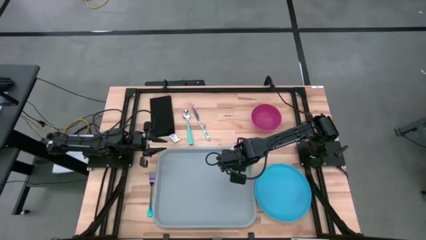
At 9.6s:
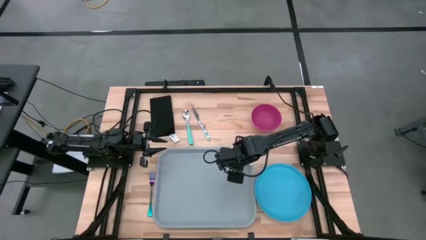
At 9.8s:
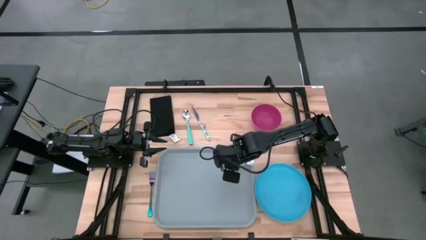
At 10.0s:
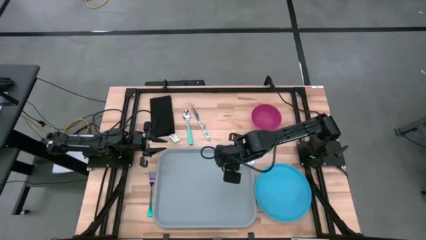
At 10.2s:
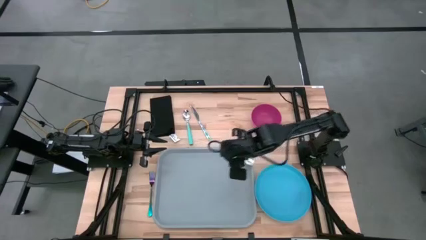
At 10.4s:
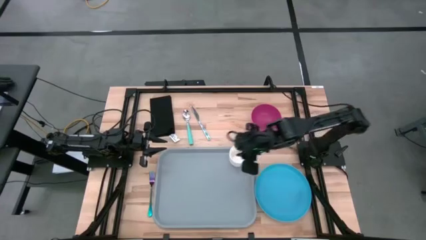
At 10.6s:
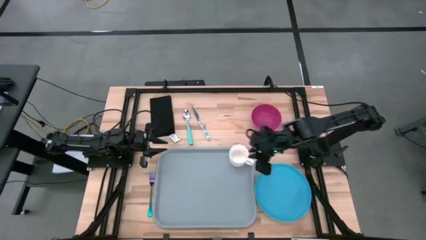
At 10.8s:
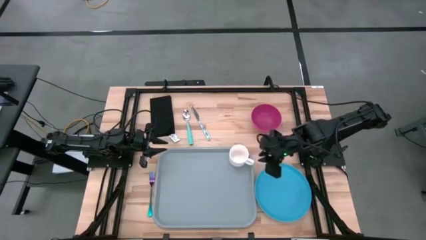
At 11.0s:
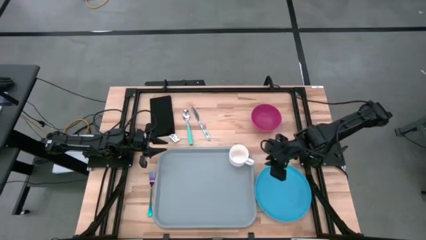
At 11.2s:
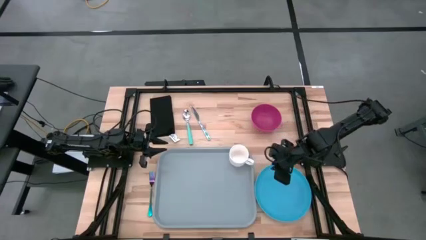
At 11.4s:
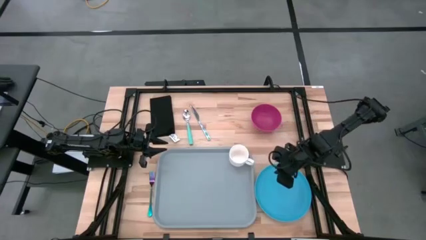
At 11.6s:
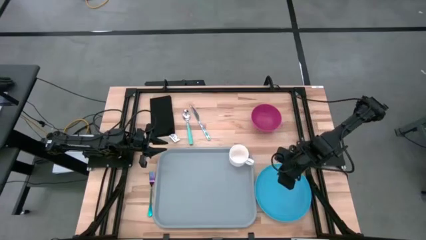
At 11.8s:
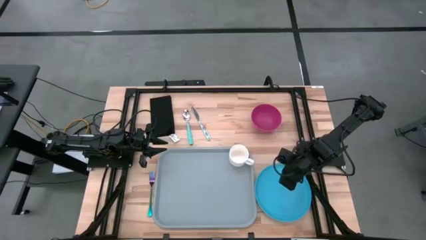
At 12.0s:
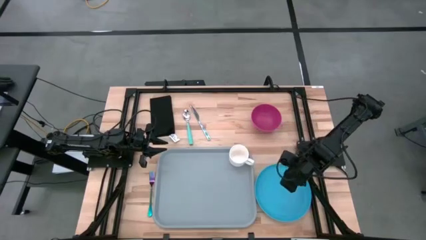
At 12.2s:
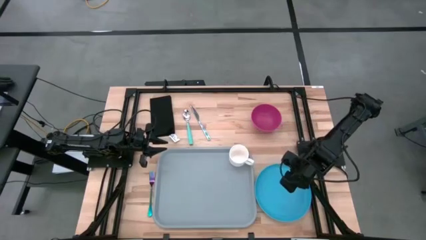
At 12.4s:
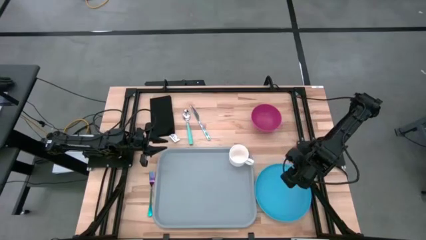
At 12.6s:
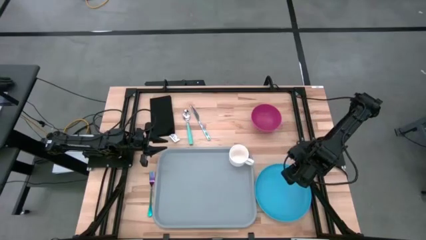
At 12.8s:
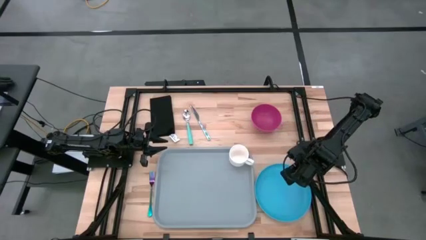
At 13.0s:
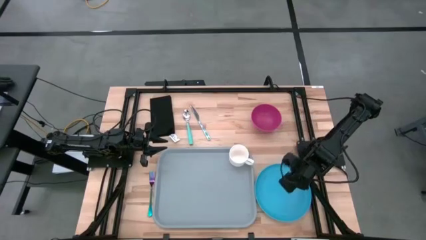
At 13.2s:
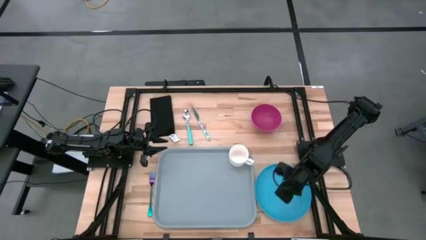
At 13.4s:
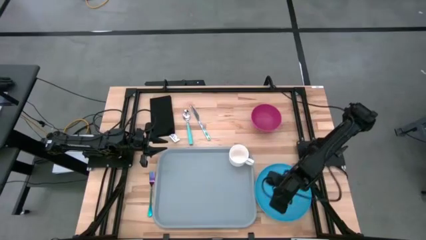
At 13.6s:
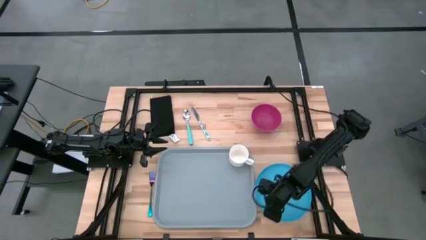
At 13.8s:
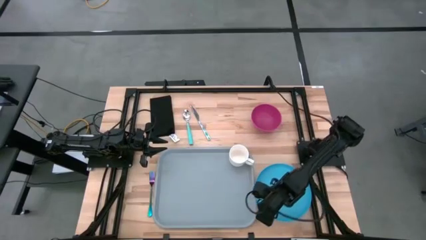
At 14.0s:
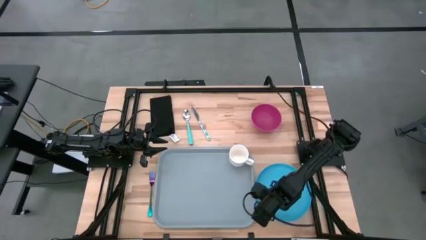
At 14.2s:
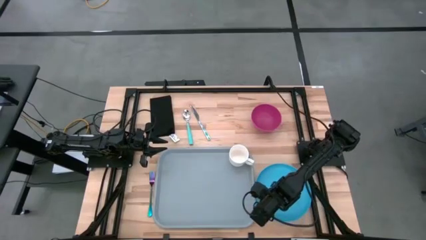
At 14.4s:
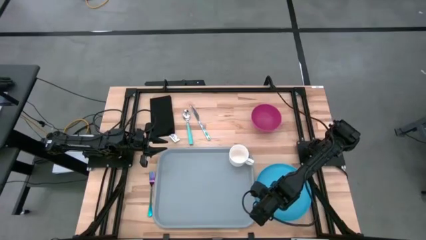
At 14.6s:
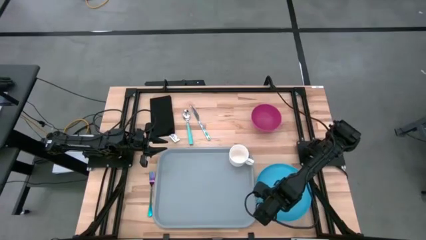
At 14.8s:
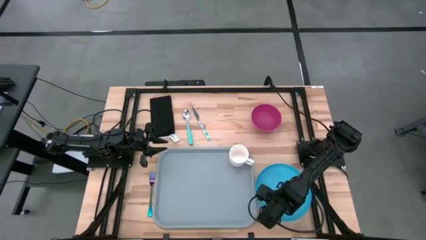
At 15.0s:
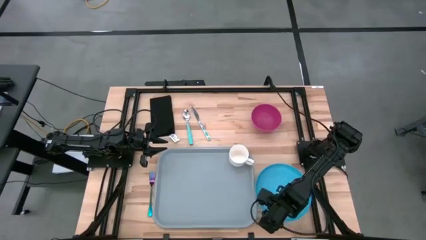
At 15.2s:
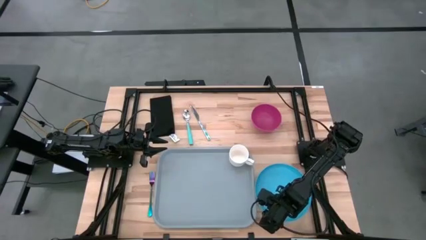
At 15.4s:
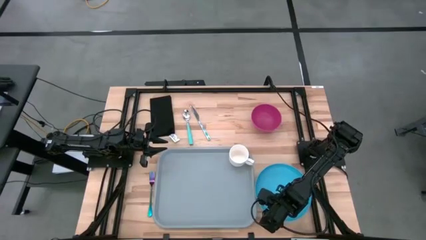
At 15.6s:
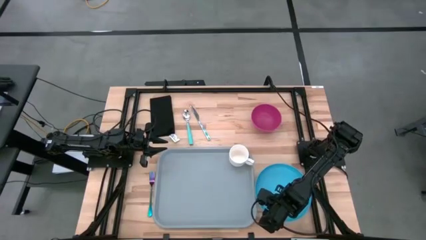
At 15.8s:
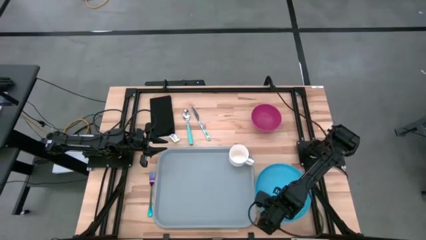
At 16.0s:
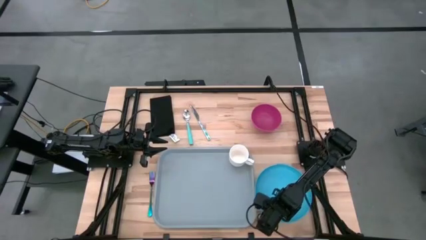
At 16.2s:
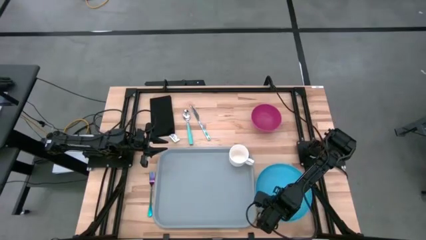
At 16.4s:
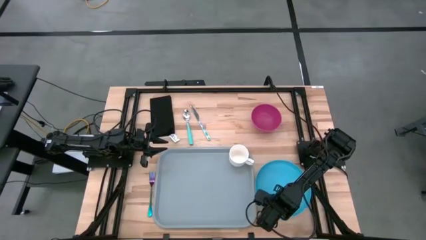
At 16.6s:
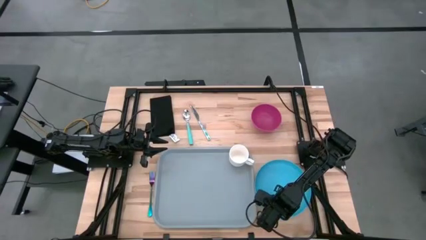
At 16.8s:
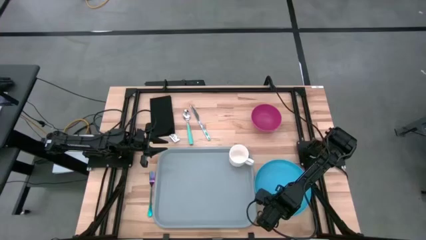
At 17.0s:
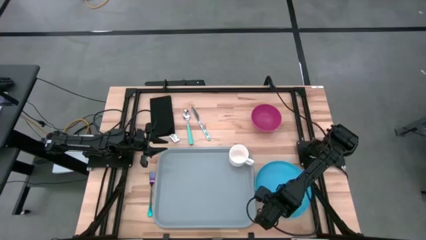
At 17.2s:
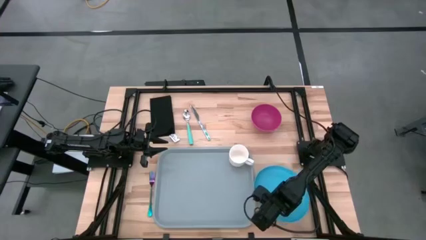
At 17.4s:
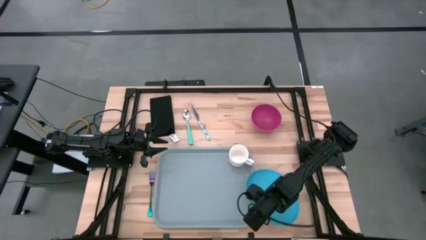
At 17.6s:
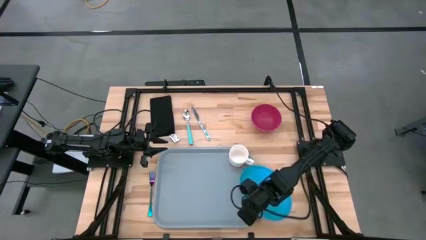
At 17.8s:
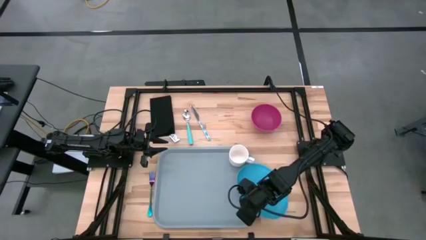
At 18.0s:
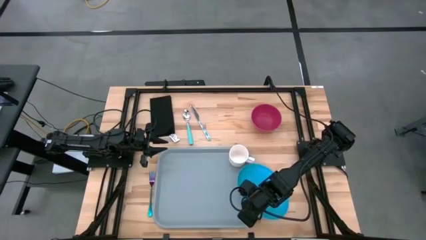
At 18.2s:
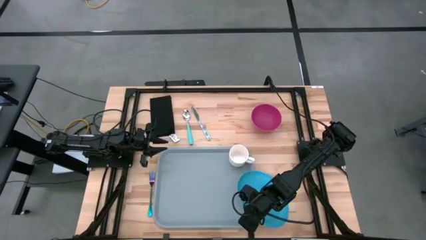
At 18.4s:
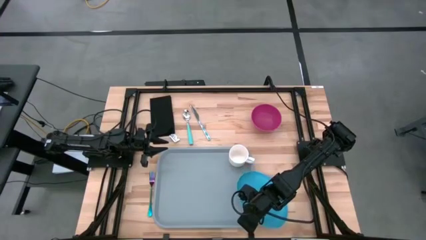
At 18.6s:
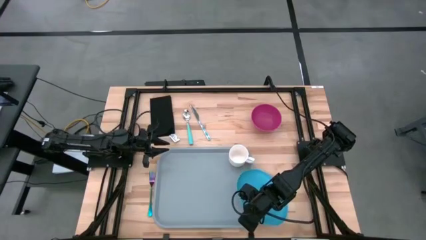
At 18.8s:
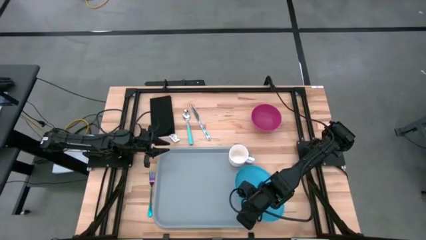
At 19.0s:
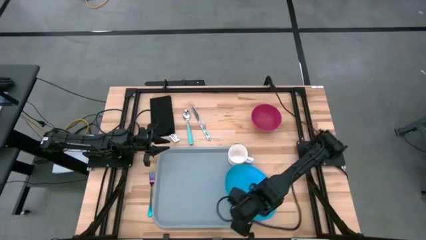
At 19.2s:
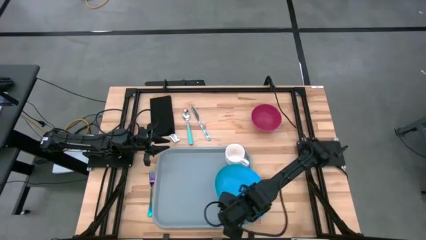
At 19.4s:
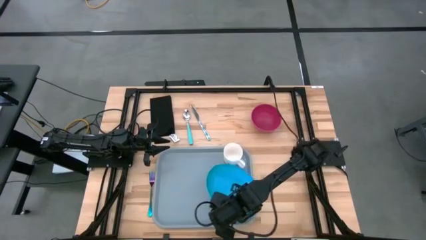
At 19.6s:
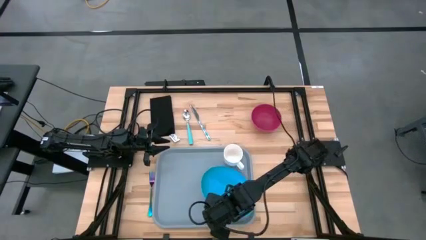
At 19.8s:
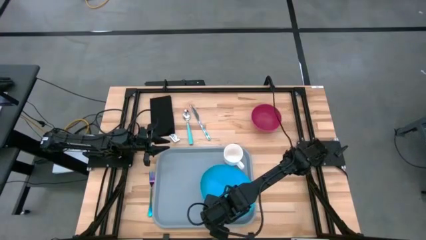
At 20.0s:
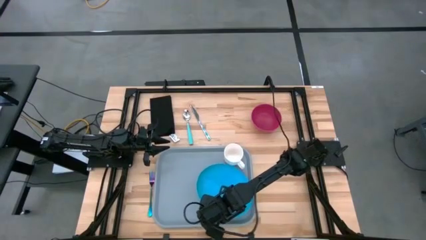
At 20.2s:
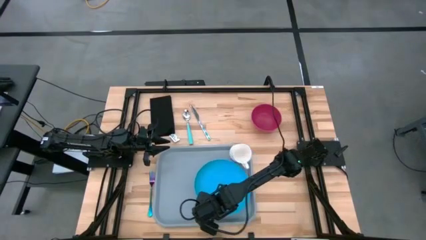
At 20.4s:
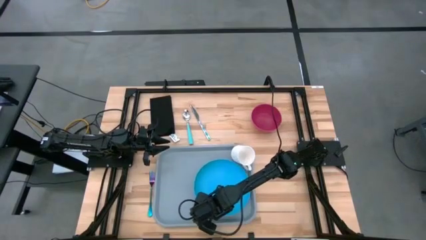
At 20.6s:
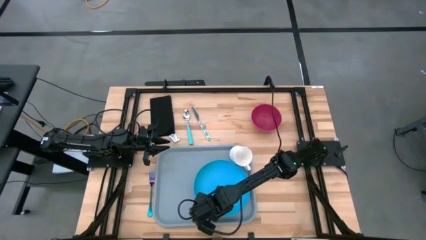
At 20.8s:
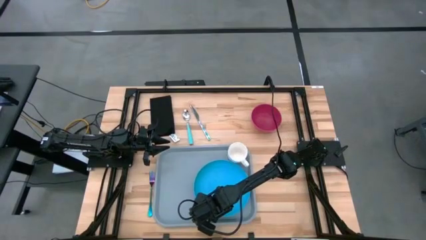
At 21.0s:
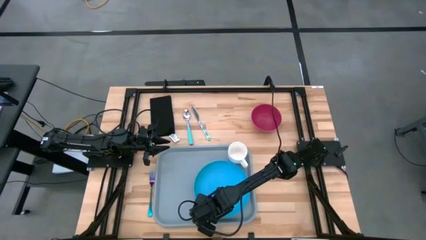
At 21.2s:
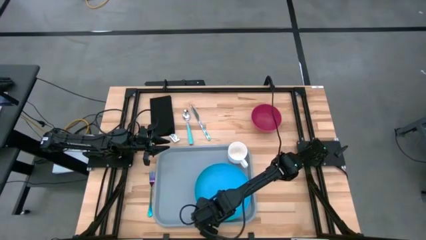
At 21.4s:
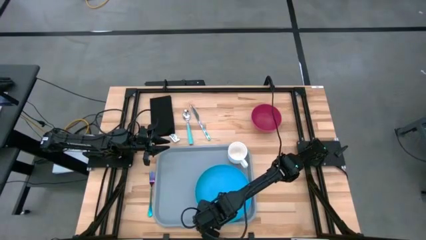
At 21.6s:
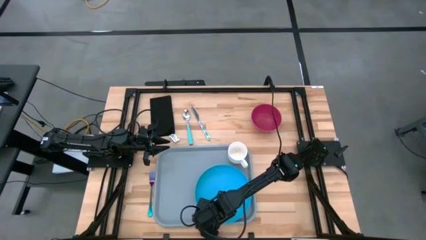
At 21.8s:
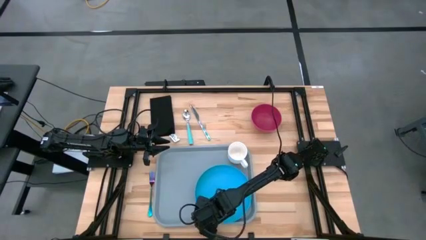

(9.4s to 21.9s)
Task: Set up tray
Put the blue plate on the gray tray below the white mug

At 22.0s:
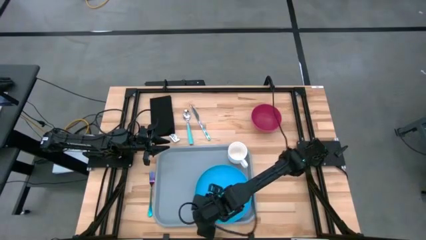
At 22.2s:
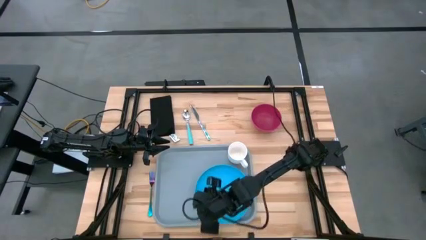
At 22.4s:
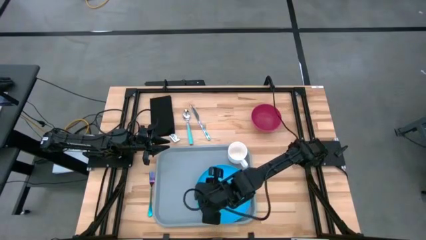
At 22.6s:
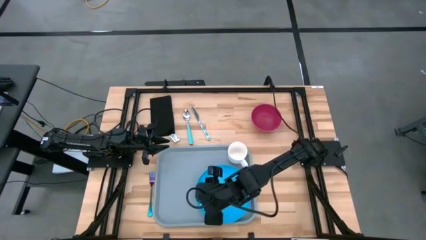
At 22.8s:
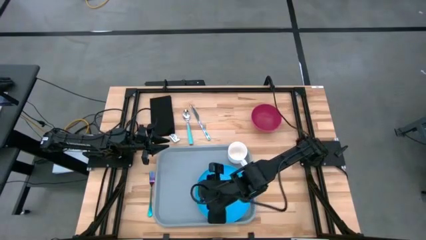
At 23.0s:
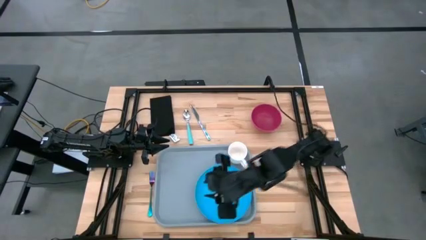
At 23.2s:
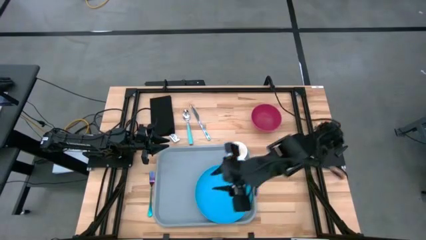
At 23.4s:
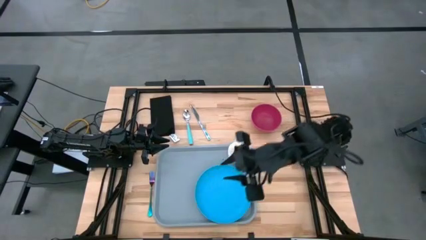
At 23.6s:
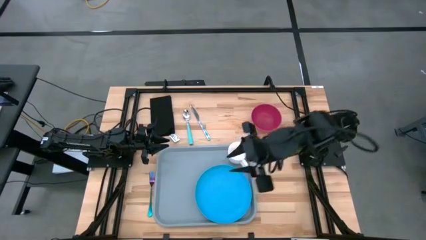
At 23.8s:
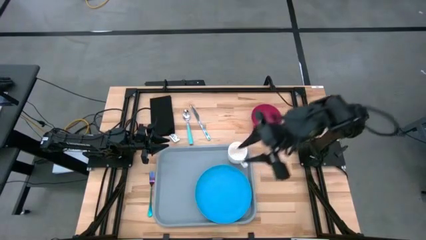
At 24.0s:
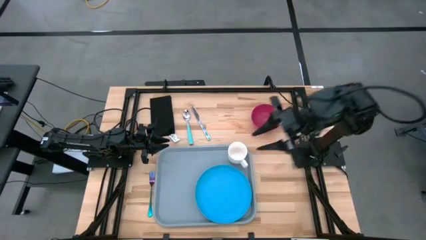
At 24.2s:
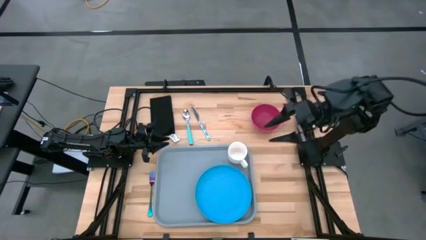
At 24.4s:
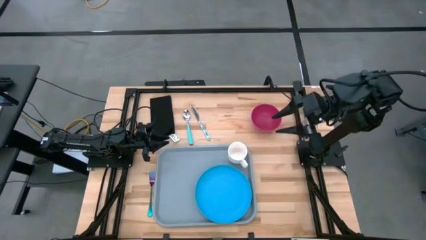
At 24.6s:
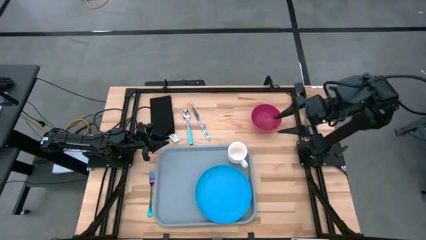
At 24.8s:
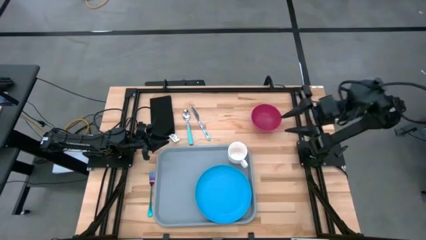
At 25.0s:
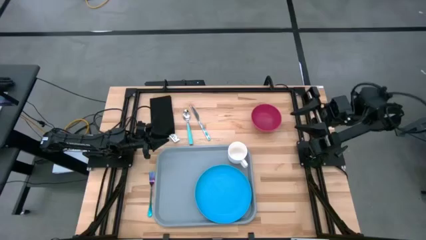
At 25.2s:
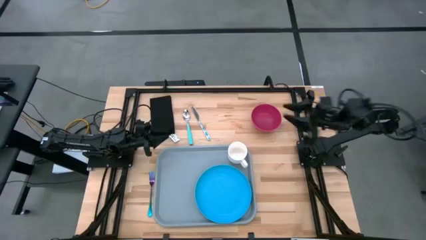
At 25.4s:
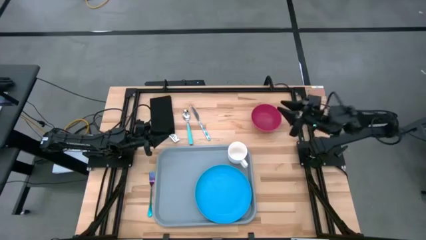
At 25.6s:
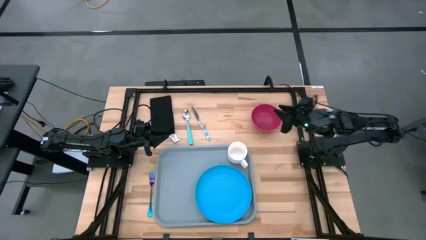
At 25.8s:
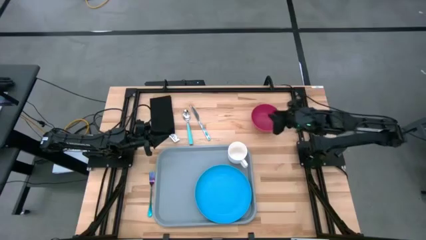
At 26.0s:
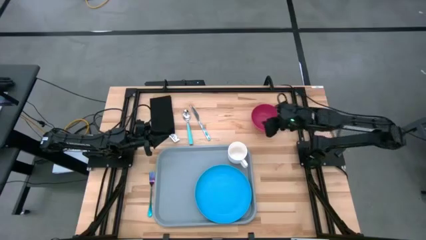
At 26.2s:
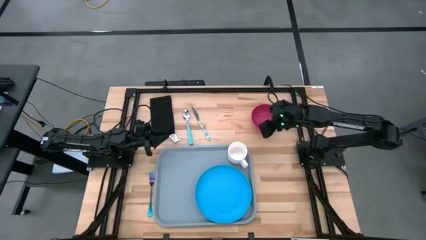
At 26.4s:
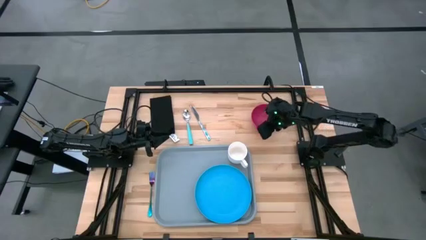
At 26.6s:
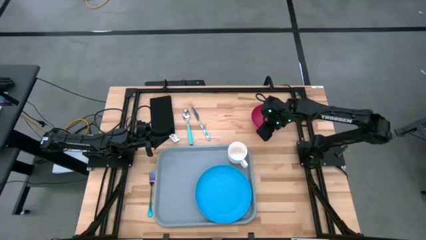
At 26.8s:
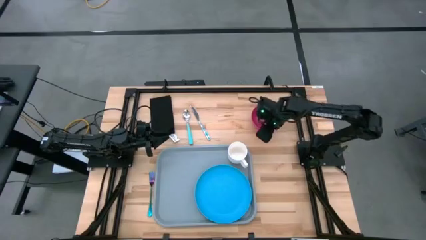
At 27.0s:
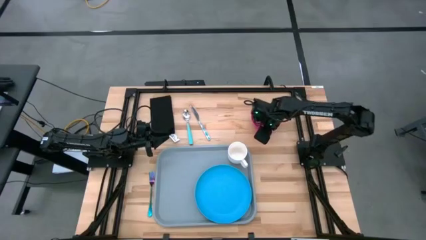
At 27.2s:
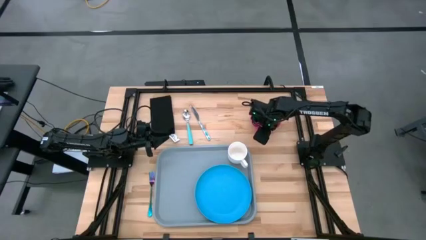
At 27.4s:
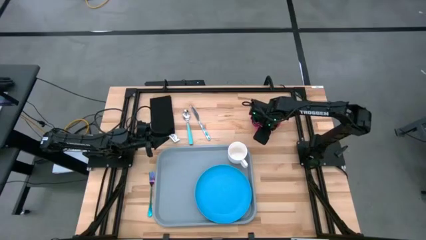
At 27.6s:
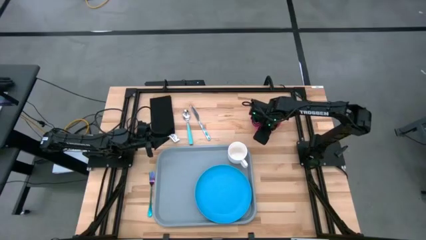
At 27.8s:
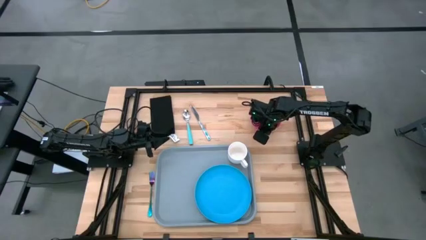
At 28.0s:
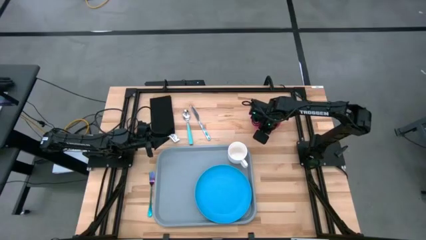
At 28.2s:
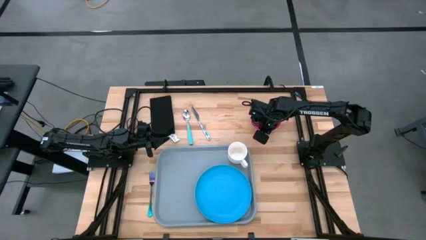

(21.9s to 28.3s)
Put the pink bowl on the blue plate on the gray tray
